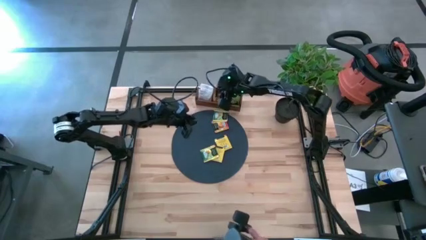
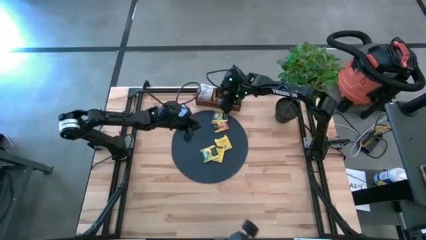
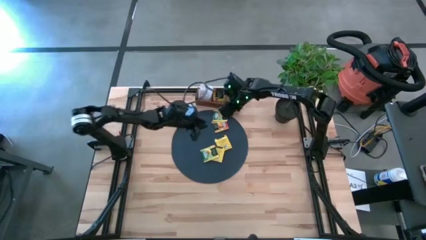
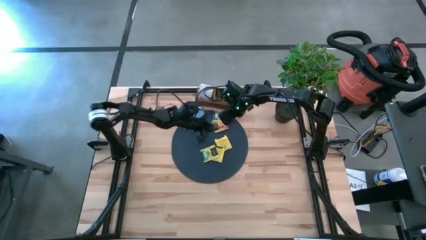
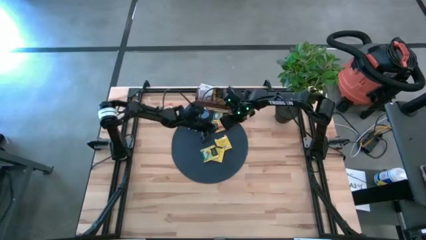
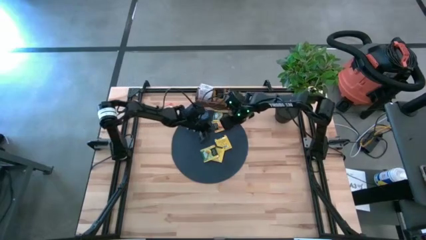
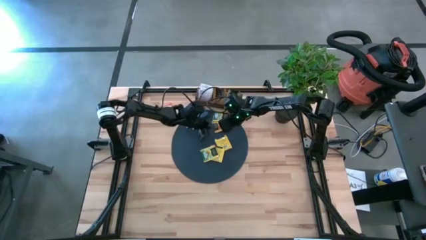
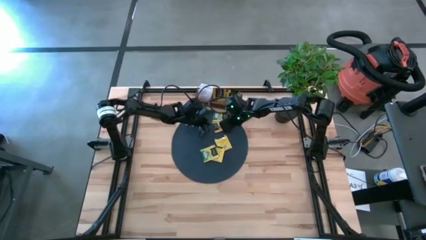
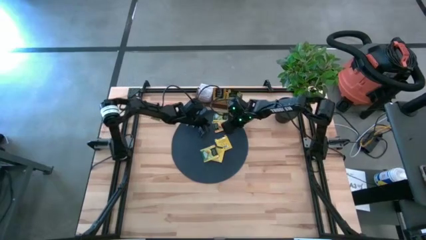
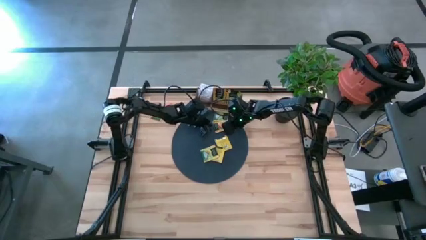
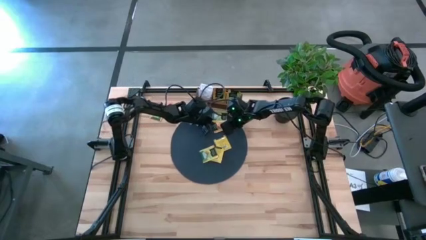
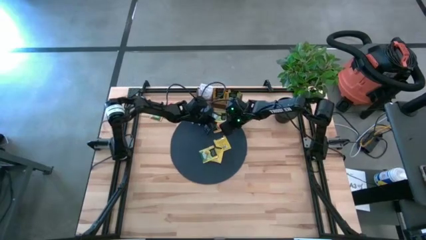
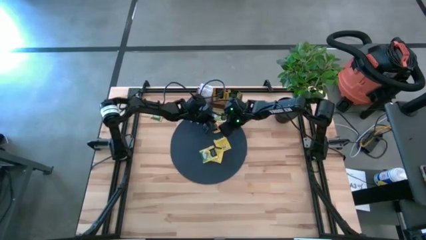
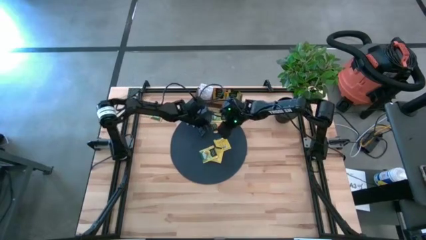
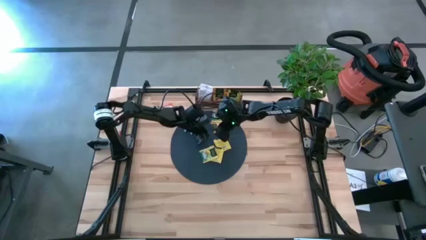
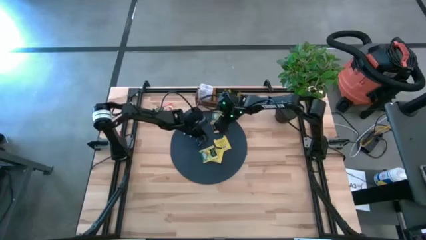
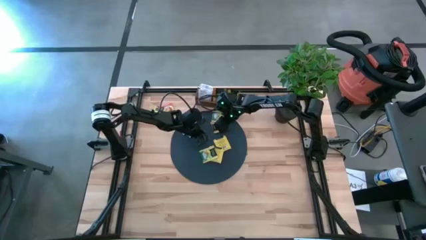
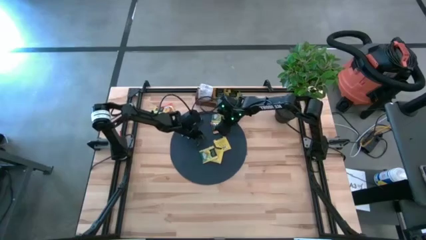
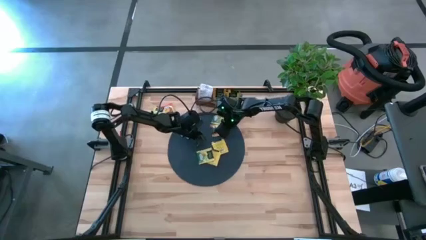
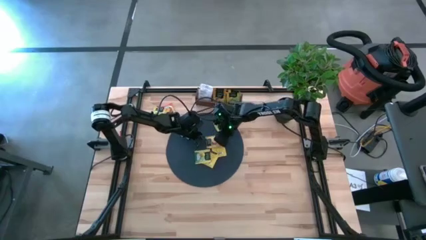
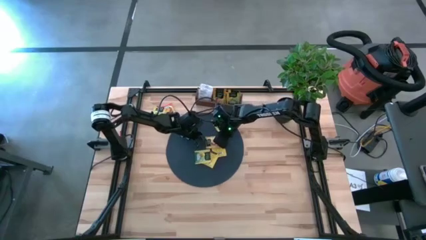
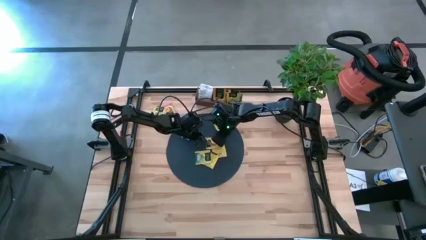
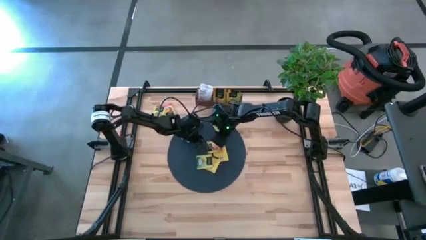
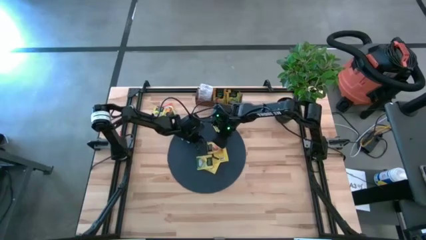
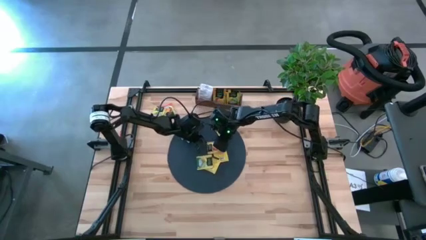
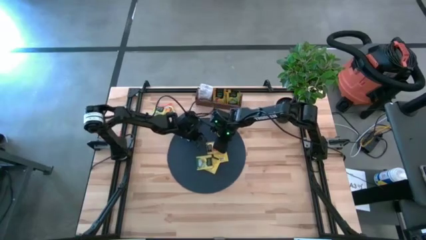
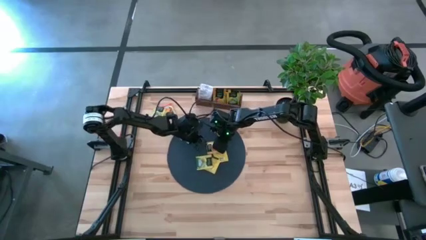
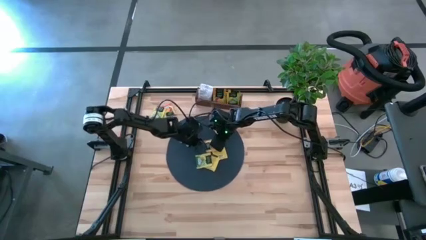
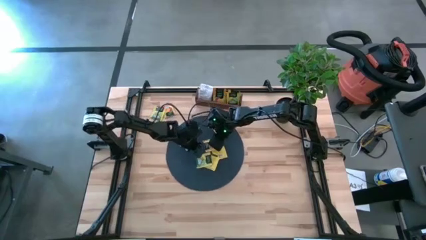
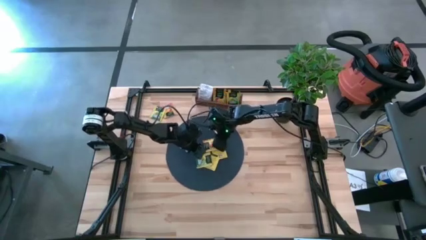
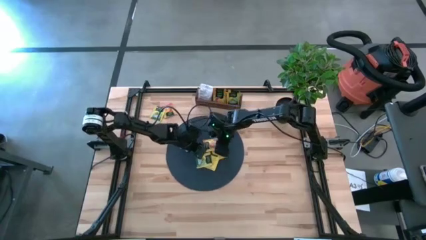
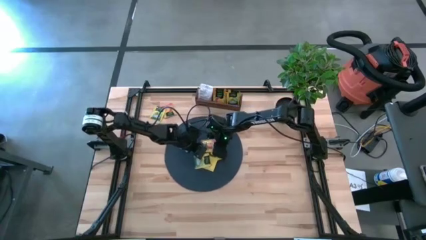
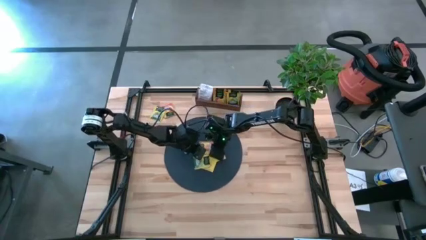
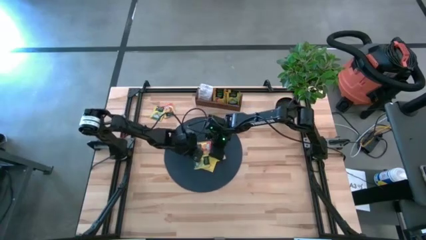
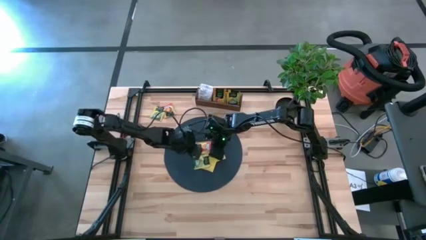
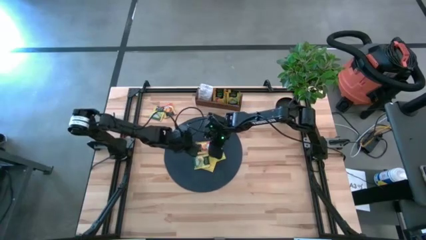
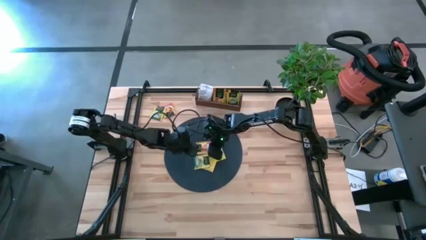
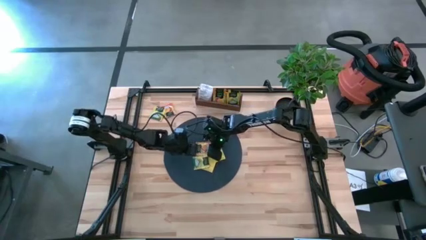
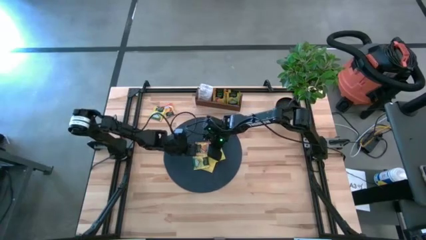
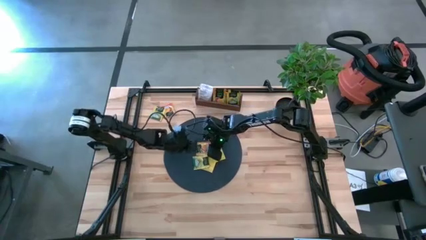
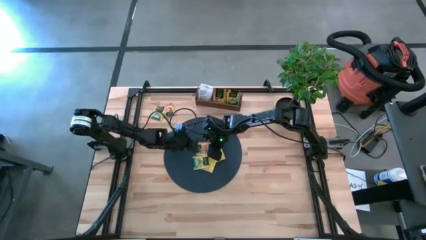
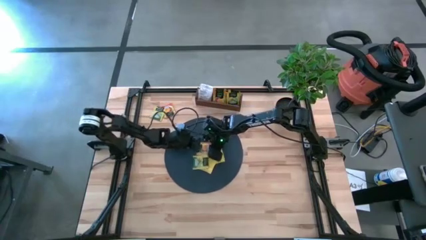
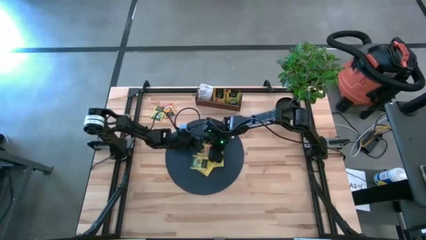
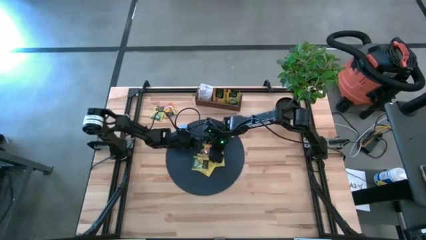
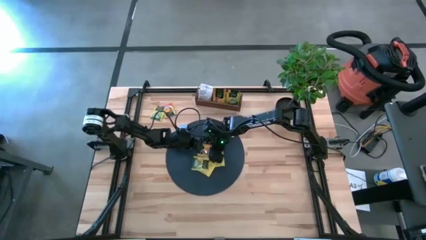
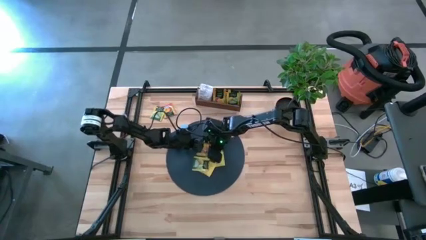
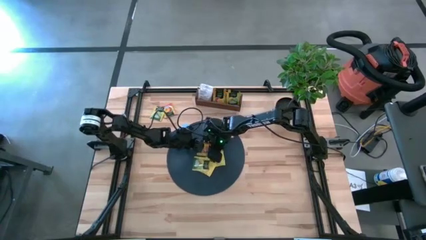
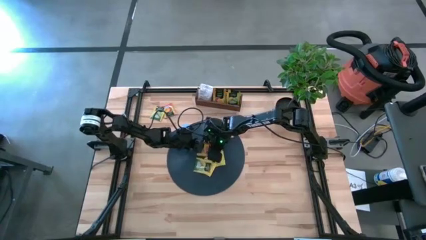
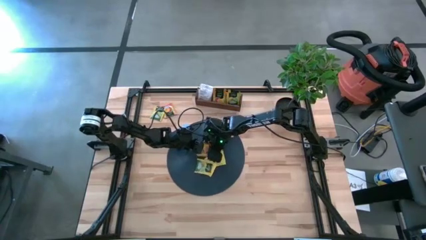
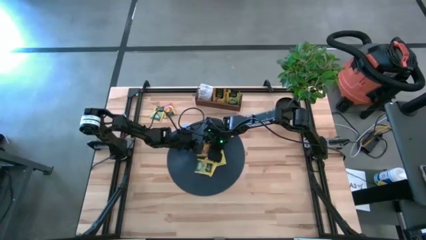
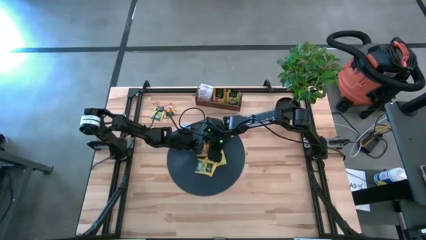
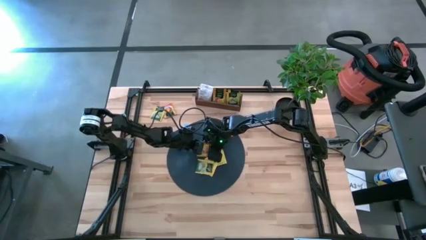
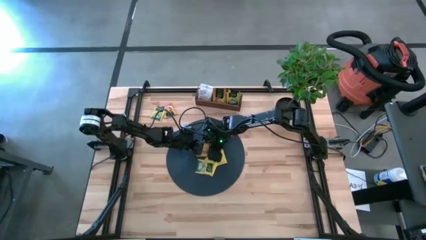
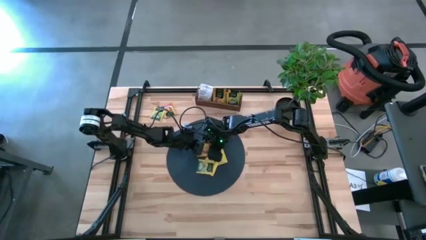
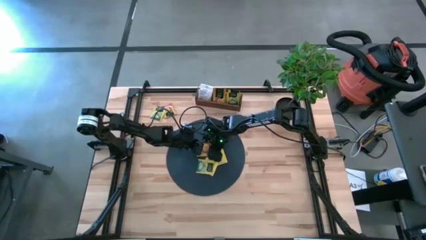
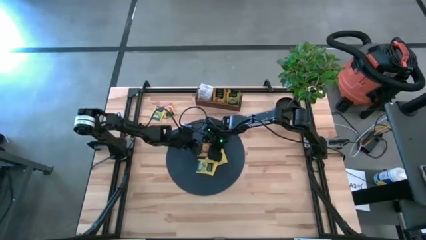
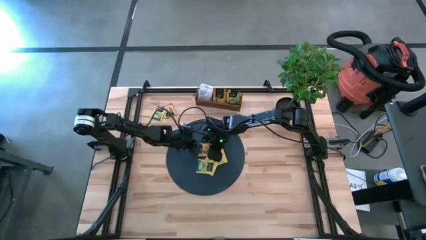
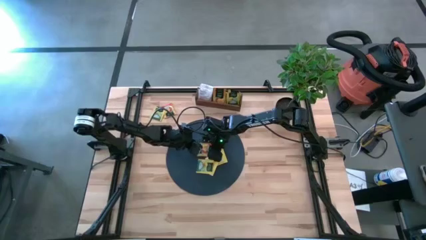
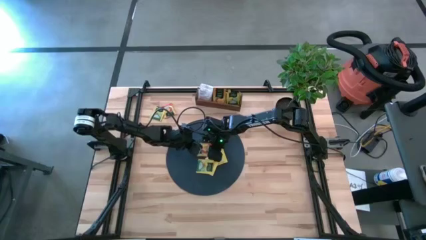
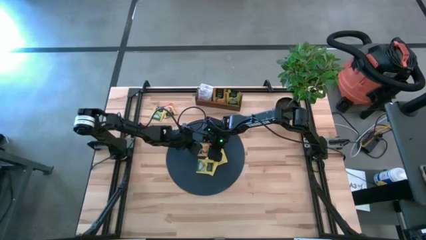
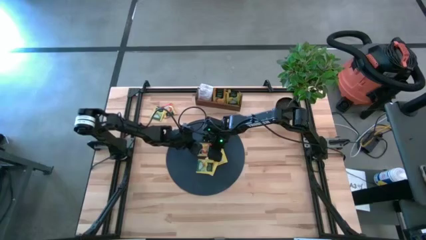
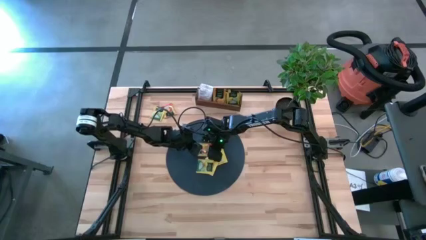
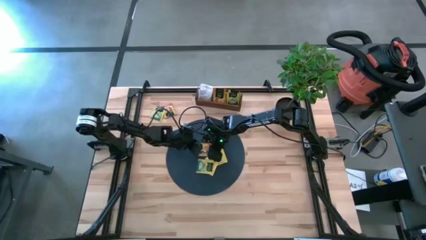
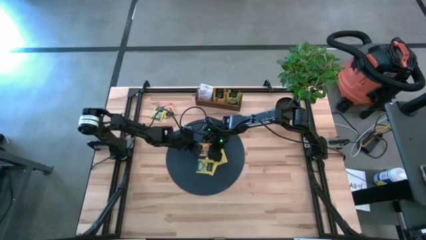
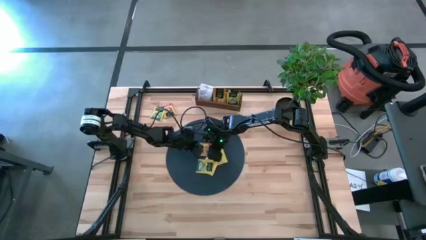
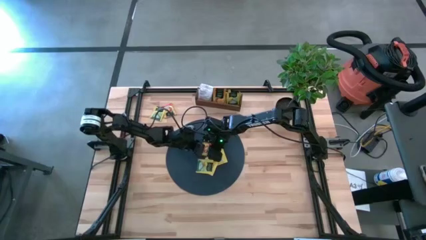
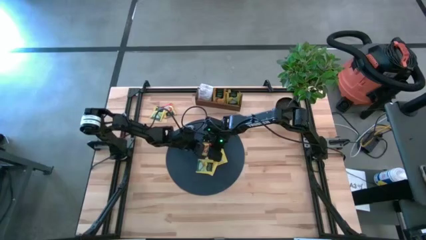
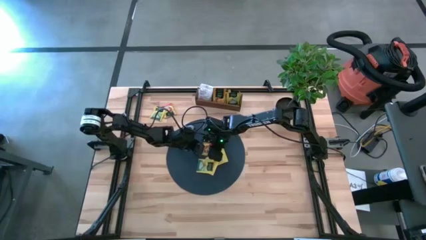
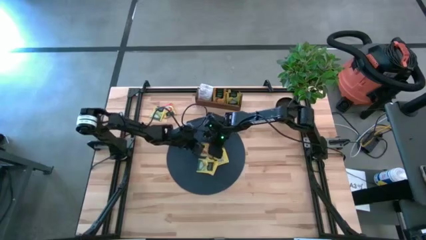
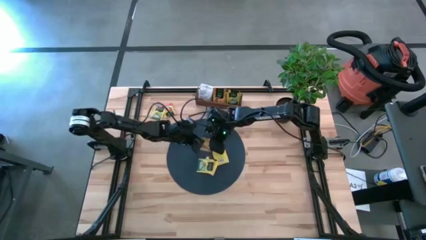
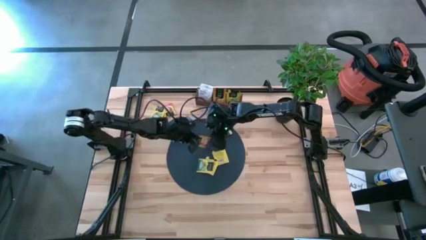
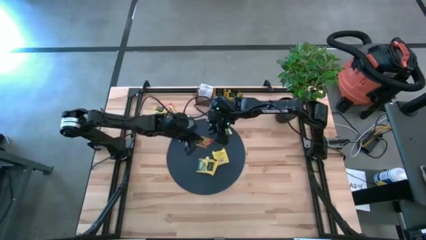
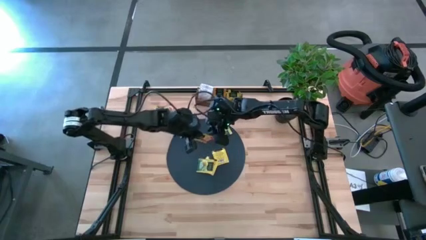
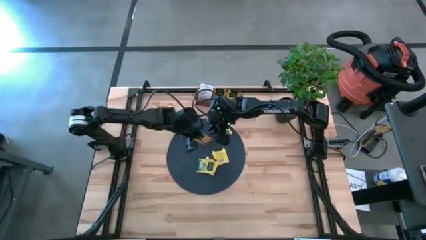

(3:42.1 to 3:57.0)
Task: Pick & Place Tea
Put the yellow tea bag into the middle section of the wooden organizer

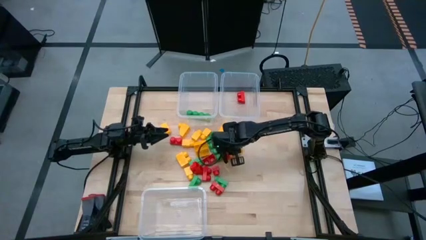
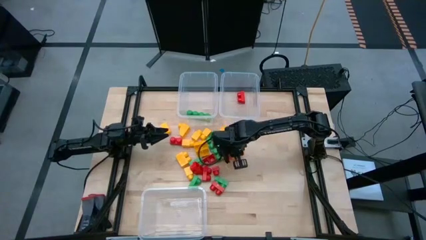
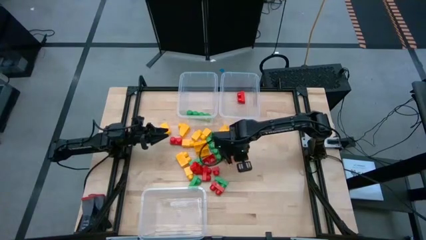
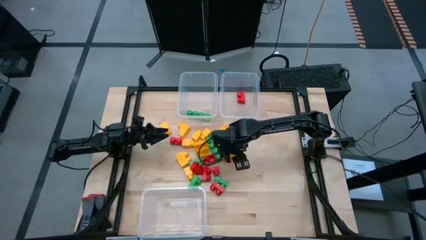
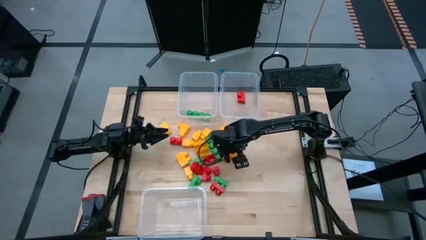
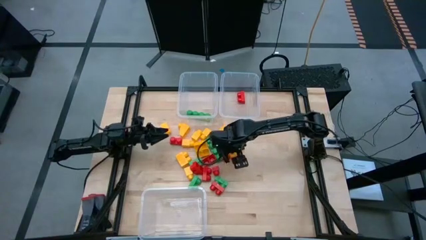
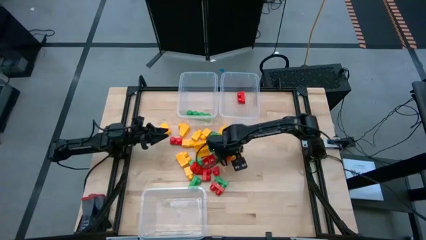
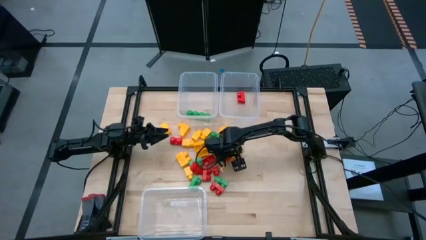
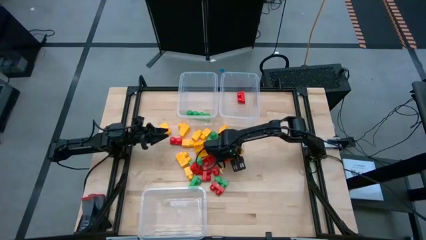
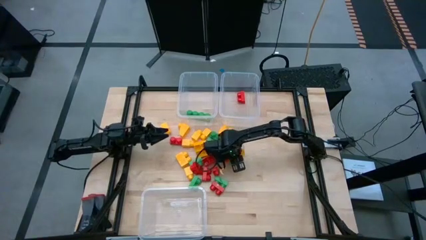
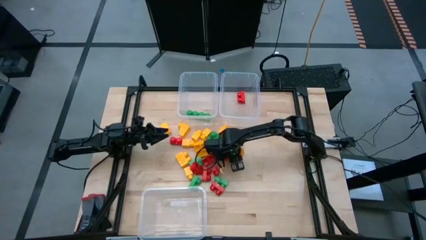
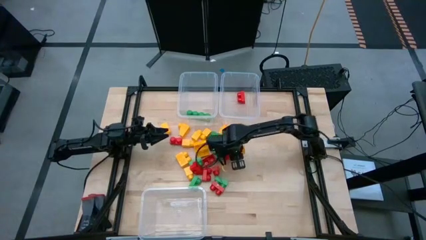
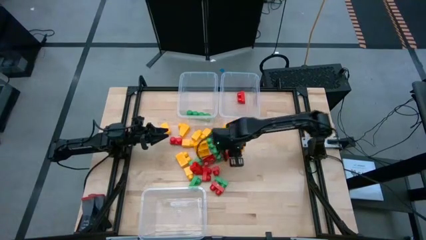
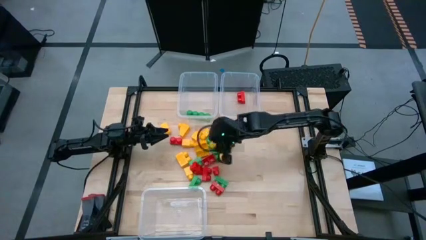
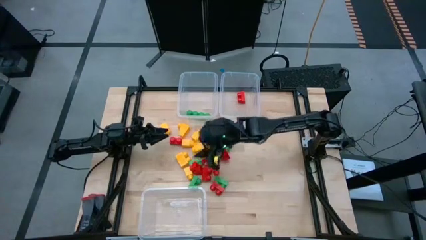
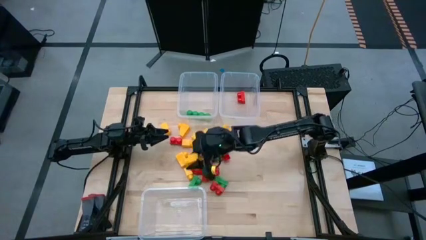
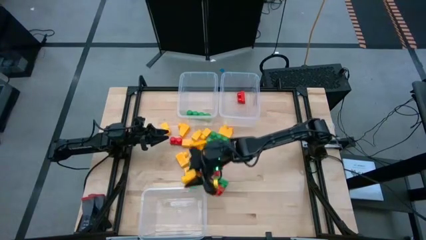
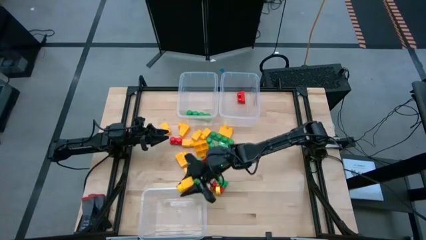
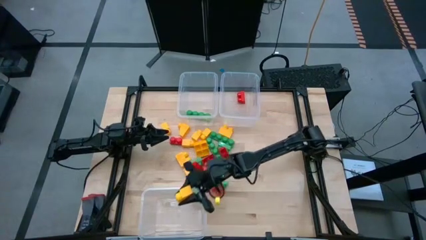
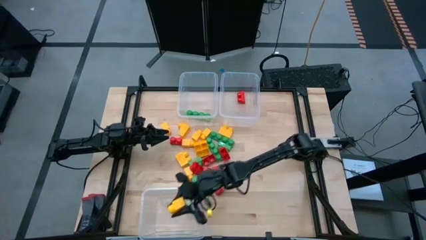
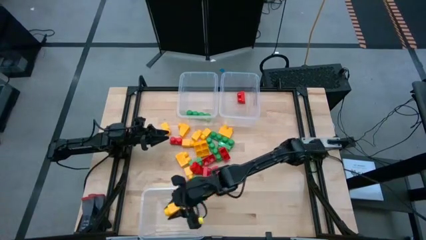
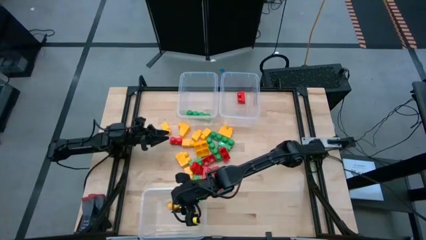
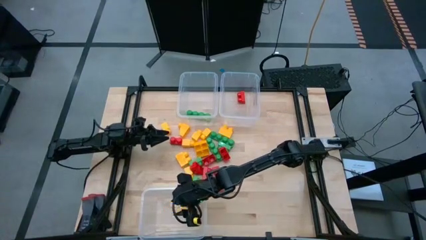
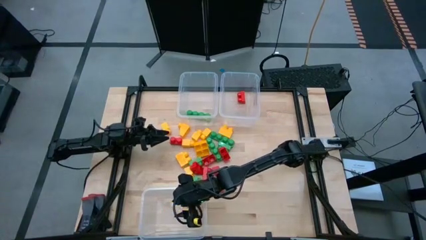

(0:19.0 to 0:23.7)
Task: Sort blocks
Put the yellow game piece into the bottom transparent bin
